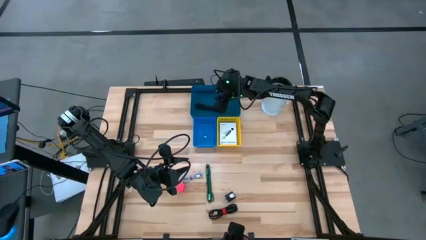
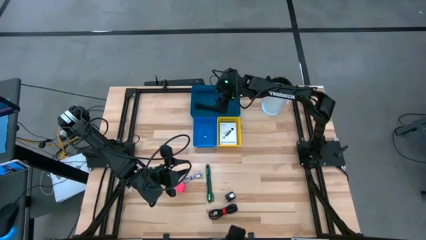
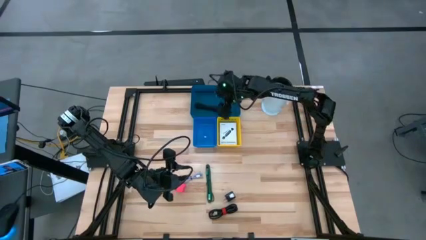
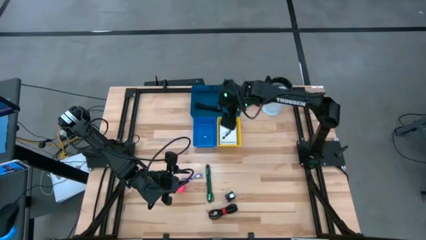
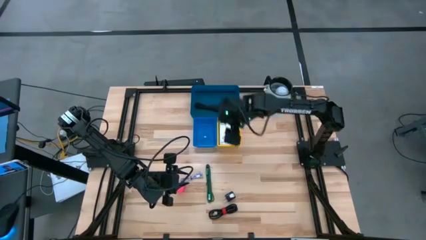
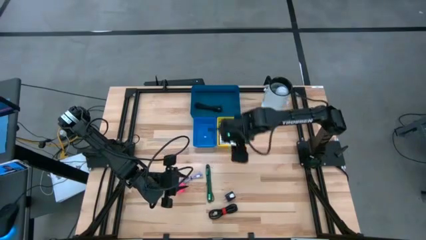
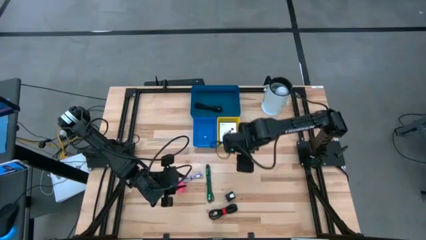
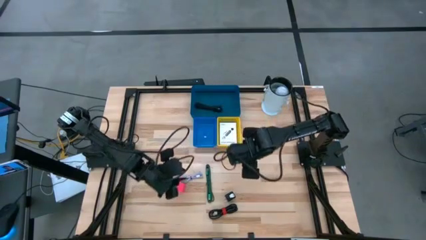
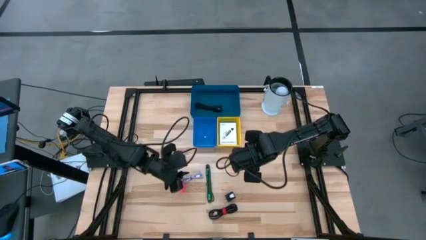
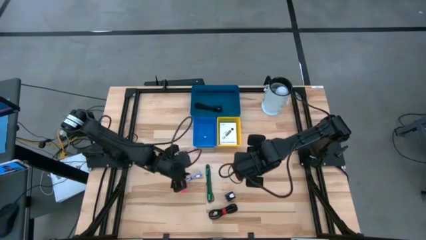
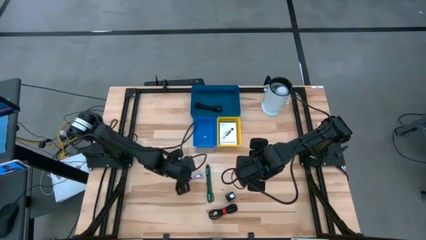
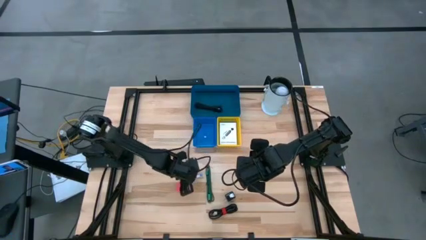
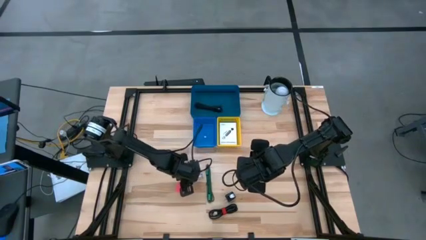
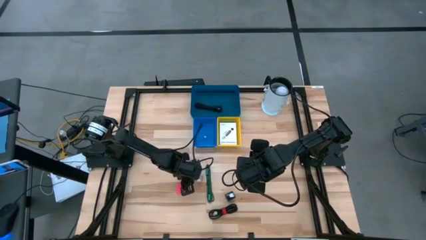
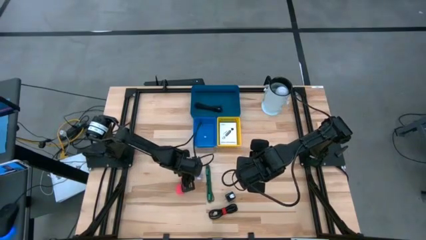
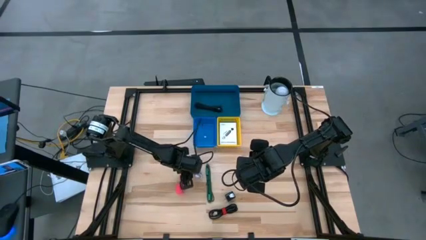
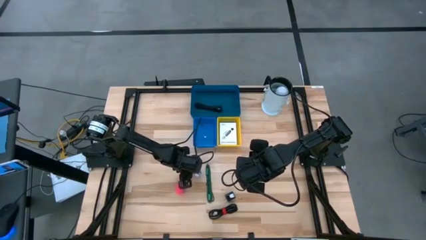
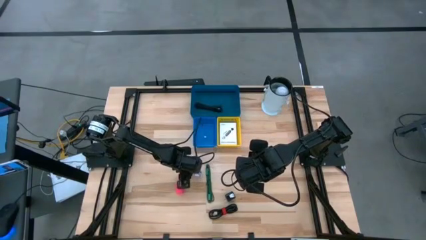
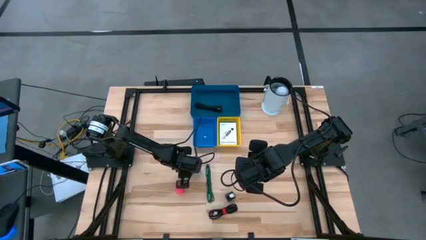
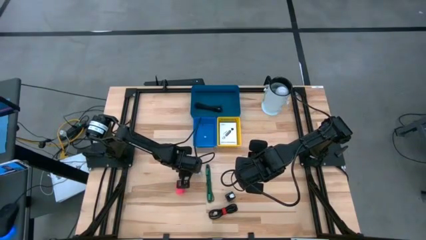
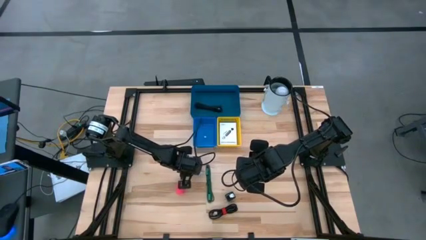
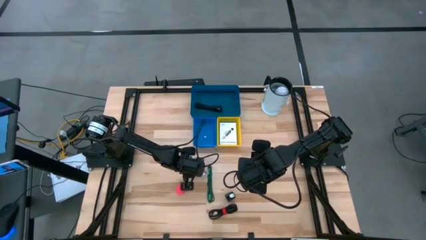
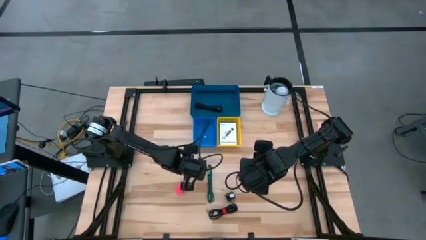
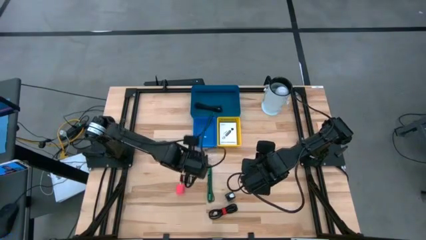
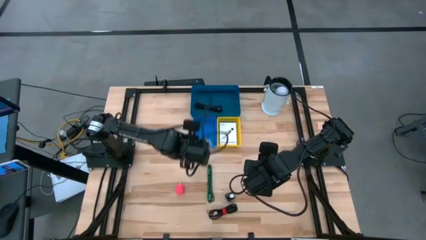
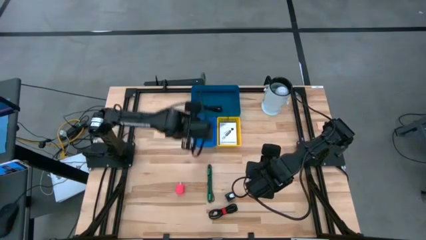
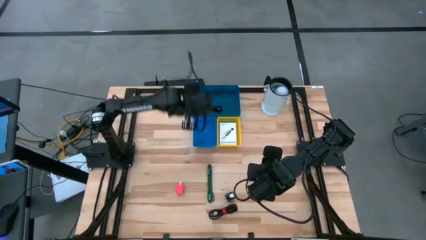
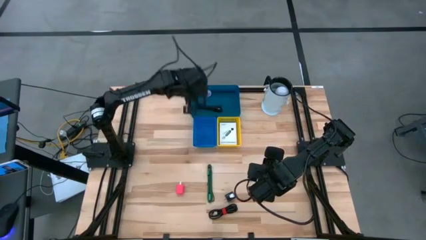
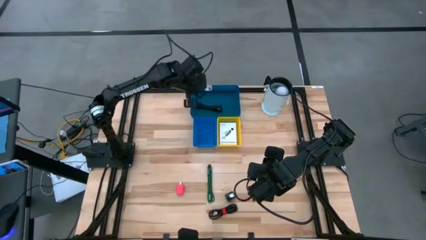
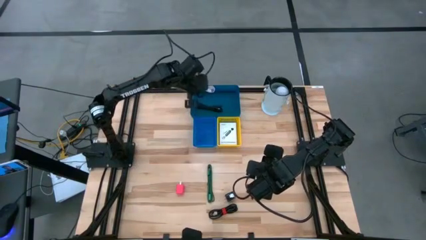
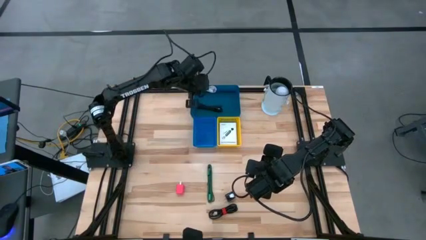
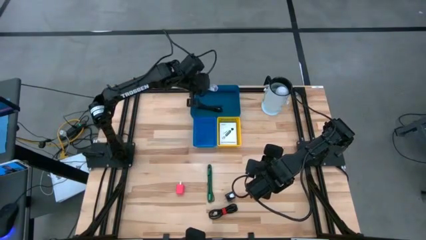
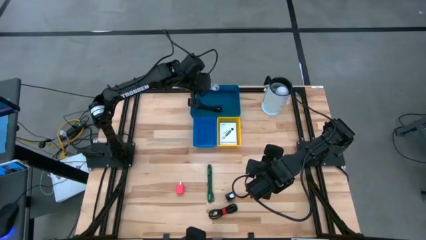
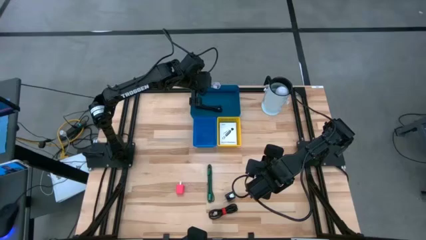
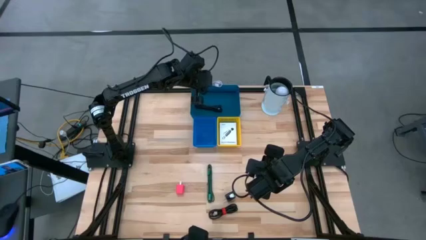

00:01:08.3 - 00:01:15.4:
Task: Pick and place items into bin
Put the white charger cable into the dark blue bin

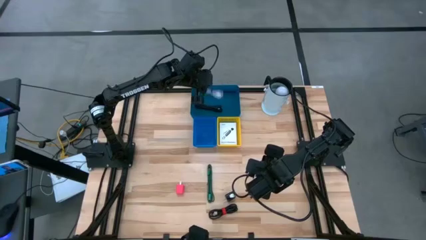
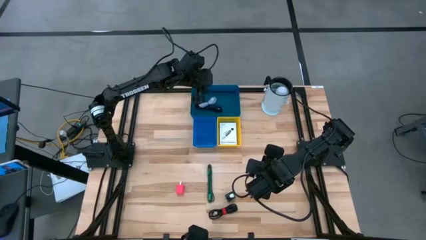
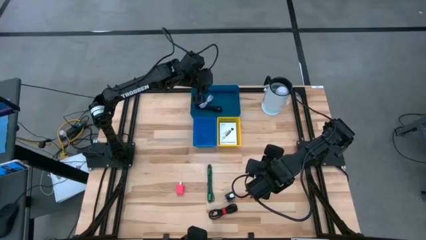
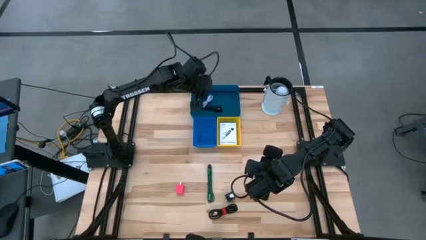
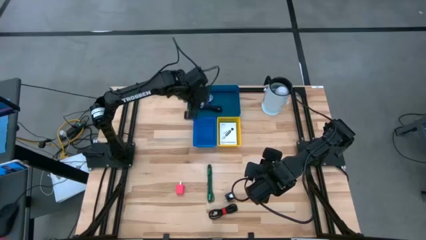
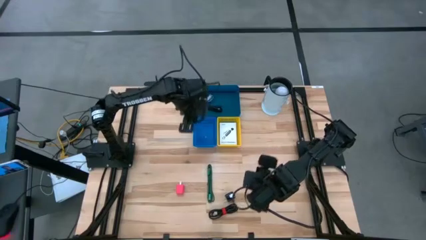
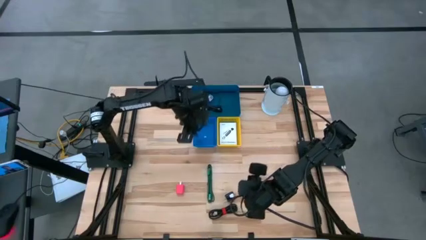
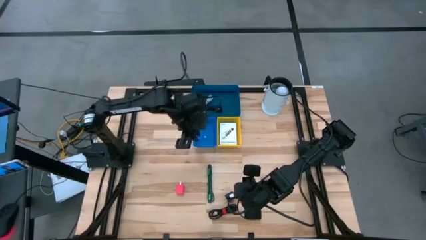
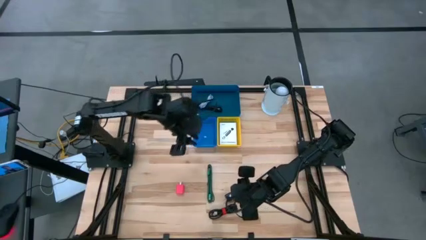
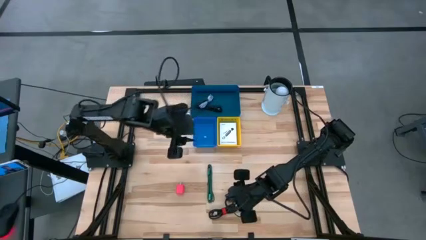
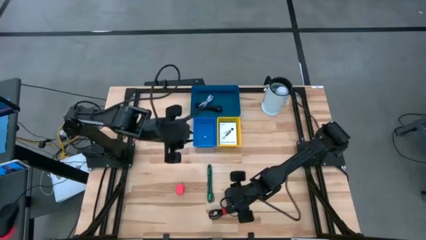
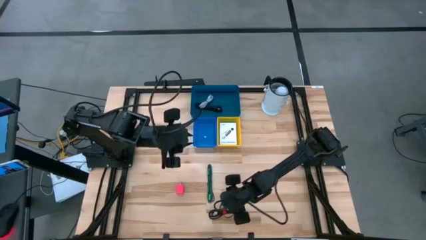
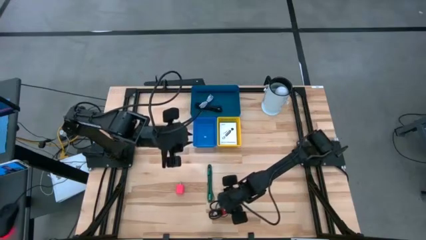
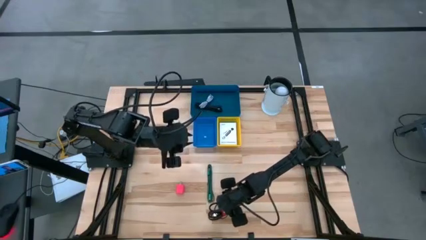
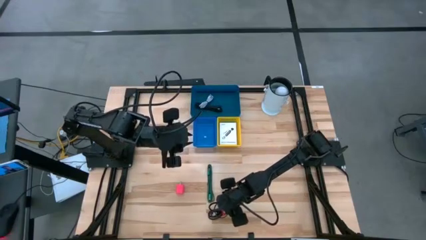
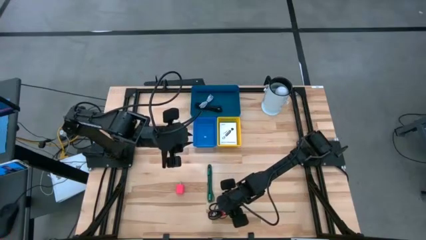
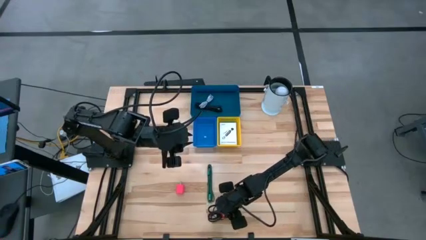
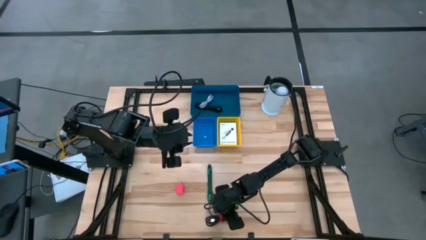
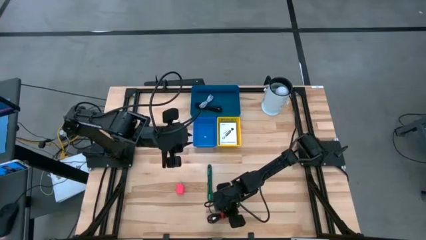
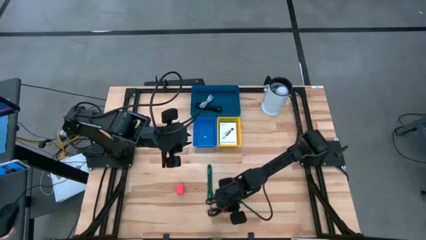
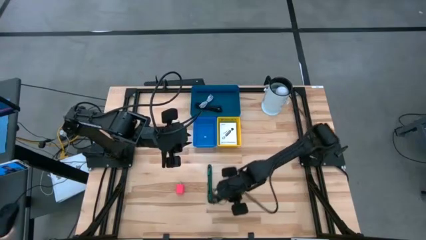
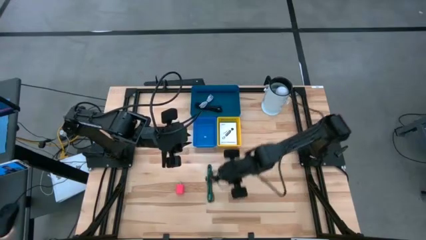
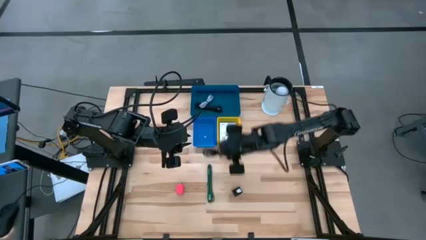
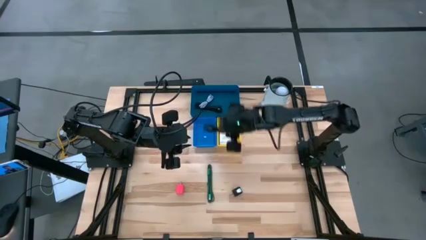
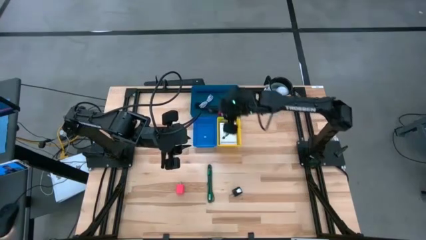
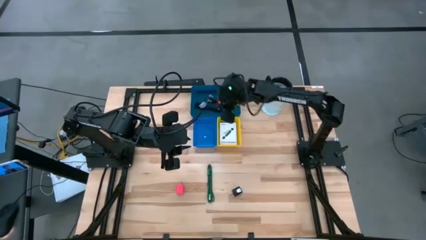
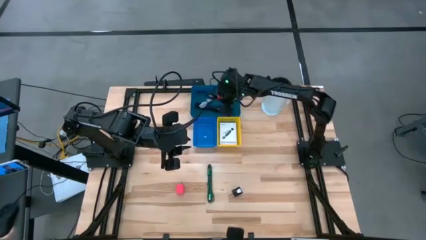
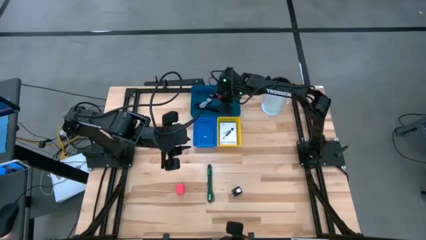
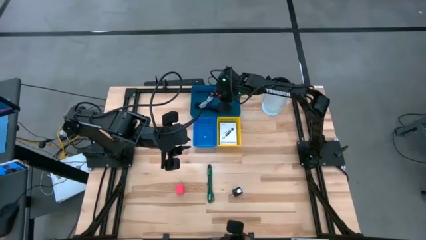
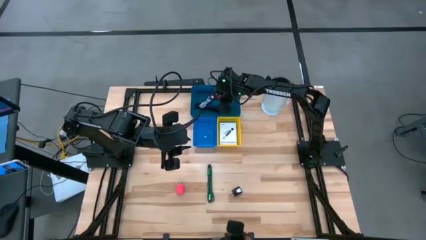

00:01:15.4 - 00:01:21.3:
Put the black charger cable into the dark blue bin
